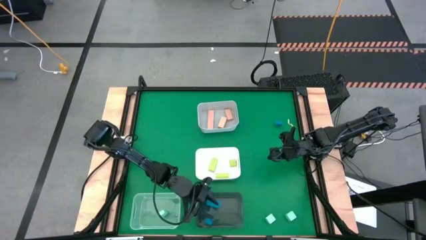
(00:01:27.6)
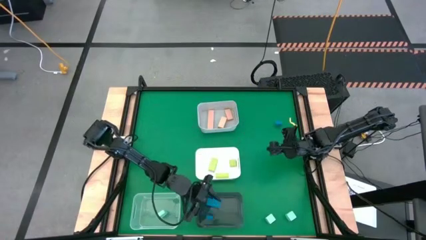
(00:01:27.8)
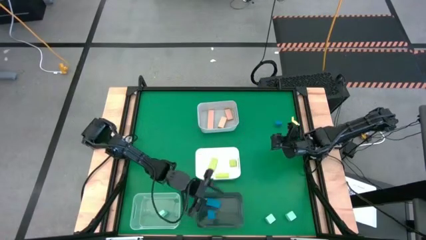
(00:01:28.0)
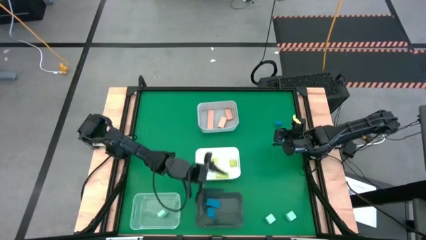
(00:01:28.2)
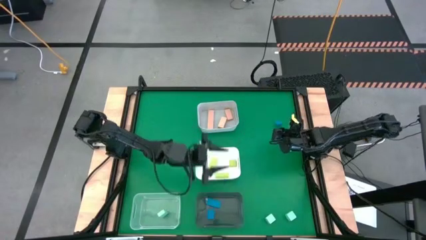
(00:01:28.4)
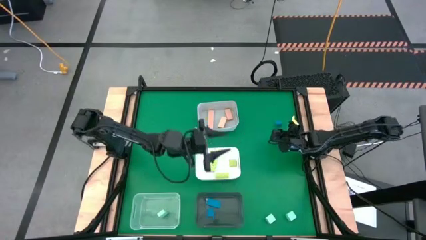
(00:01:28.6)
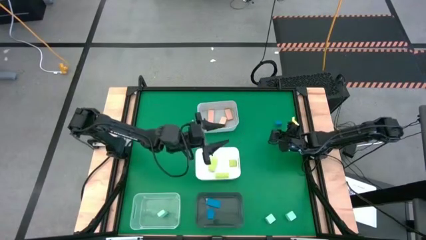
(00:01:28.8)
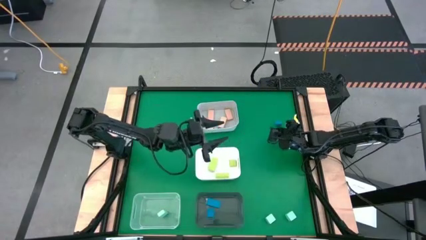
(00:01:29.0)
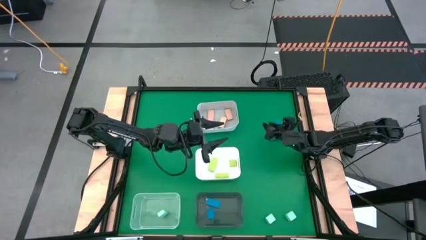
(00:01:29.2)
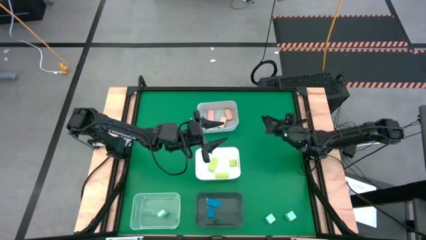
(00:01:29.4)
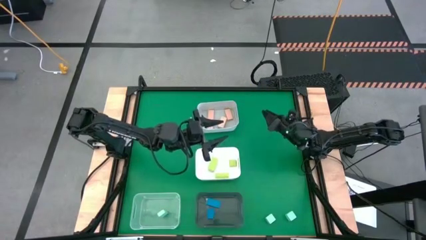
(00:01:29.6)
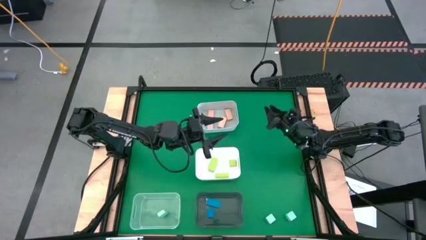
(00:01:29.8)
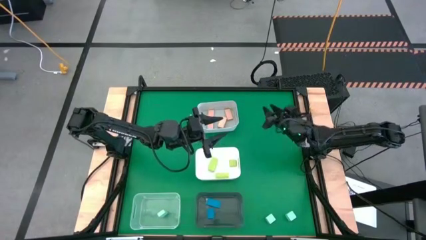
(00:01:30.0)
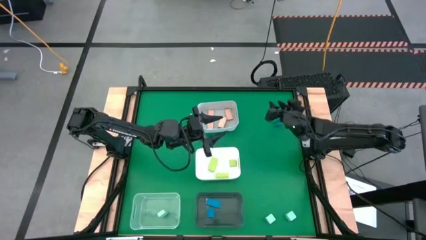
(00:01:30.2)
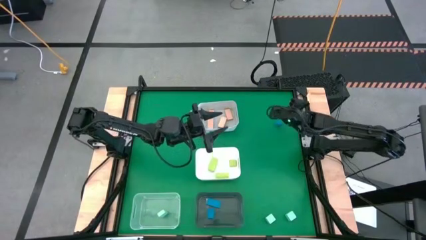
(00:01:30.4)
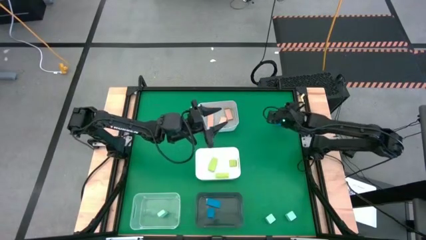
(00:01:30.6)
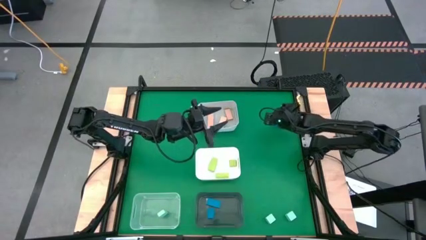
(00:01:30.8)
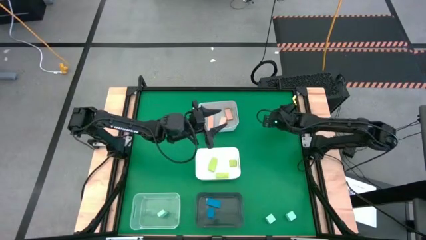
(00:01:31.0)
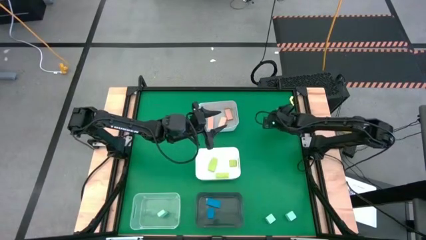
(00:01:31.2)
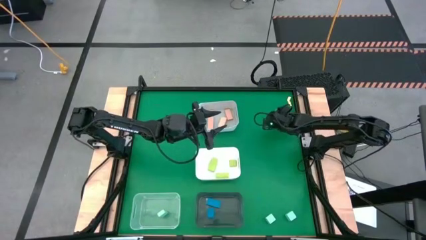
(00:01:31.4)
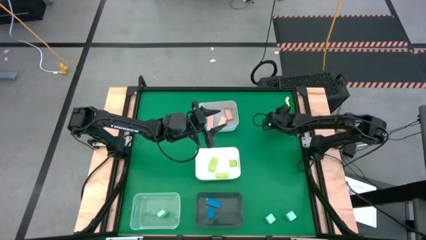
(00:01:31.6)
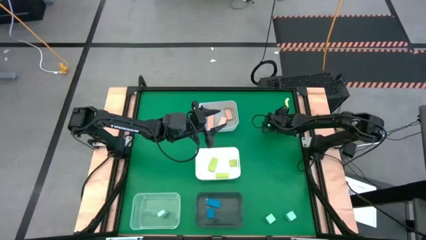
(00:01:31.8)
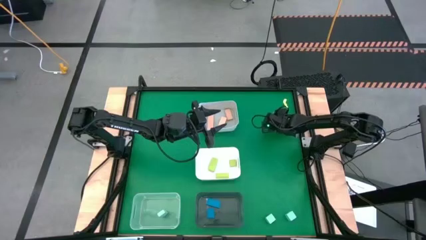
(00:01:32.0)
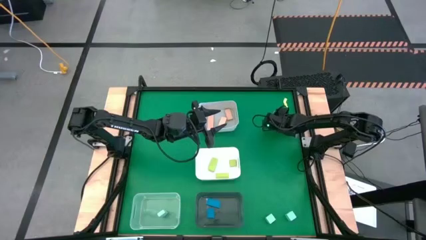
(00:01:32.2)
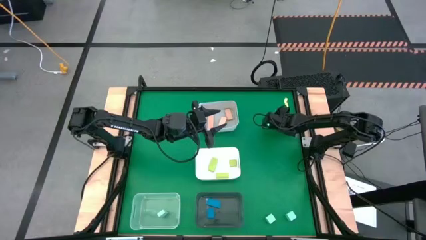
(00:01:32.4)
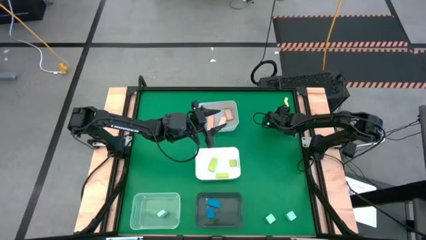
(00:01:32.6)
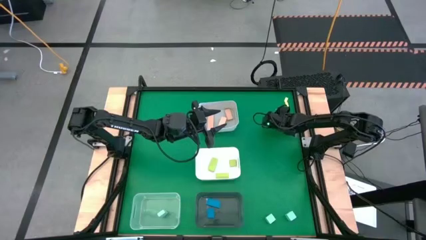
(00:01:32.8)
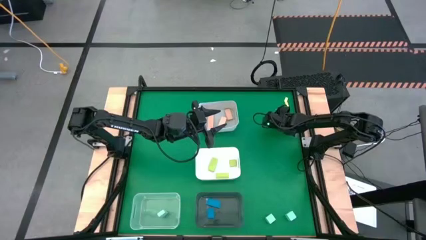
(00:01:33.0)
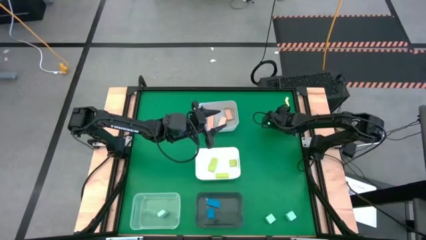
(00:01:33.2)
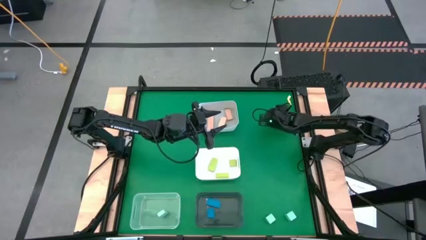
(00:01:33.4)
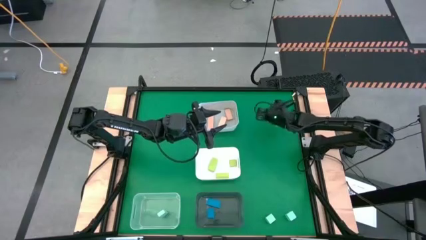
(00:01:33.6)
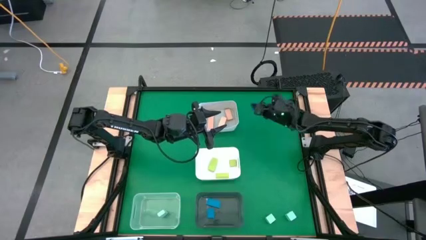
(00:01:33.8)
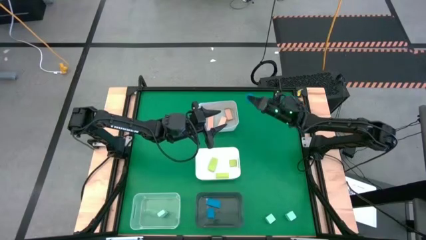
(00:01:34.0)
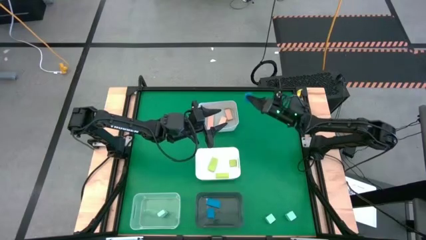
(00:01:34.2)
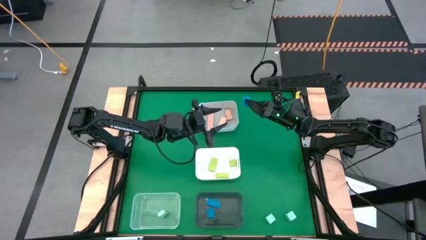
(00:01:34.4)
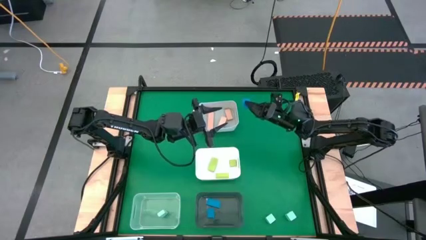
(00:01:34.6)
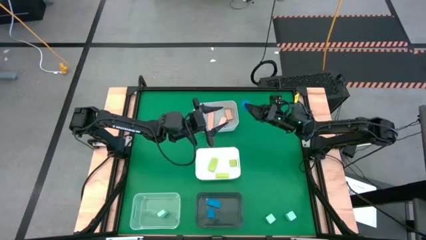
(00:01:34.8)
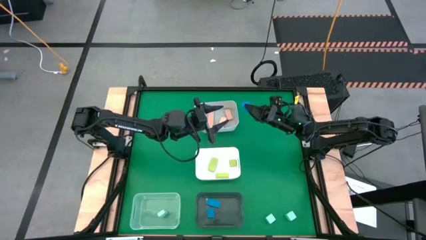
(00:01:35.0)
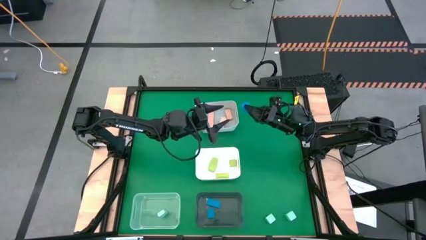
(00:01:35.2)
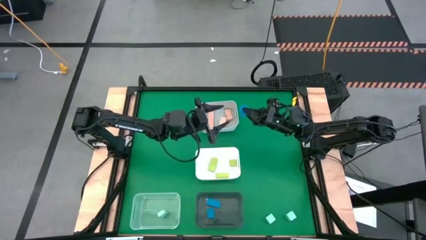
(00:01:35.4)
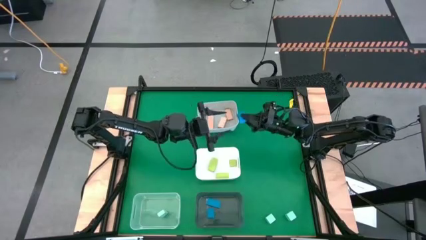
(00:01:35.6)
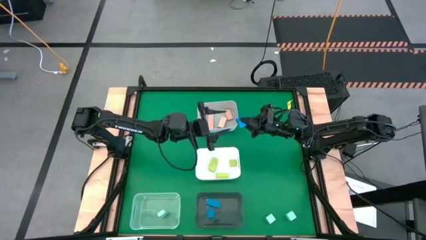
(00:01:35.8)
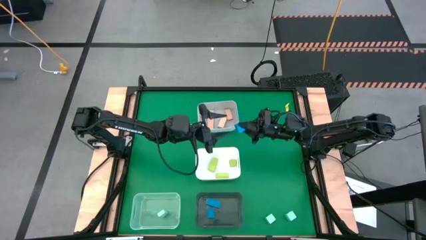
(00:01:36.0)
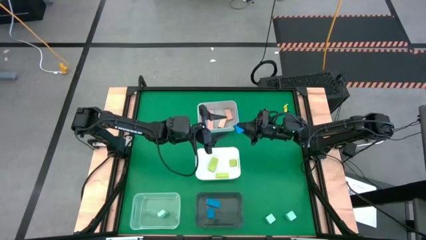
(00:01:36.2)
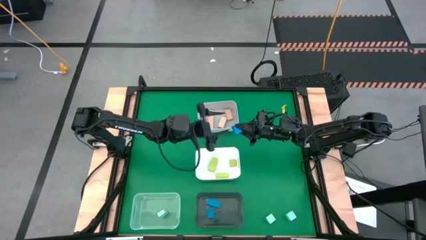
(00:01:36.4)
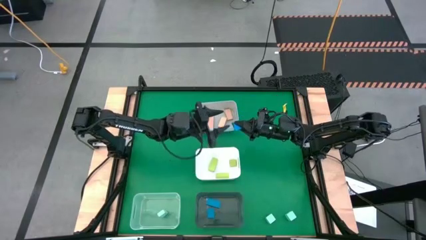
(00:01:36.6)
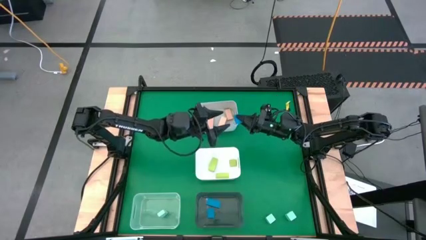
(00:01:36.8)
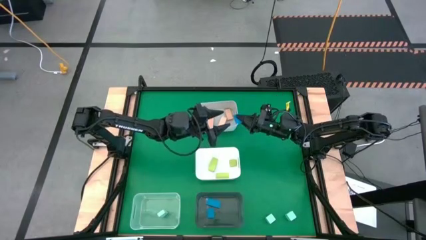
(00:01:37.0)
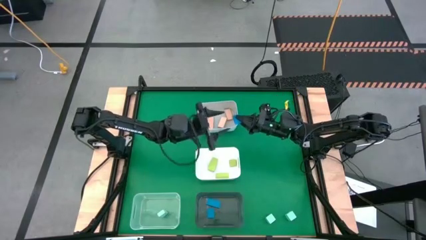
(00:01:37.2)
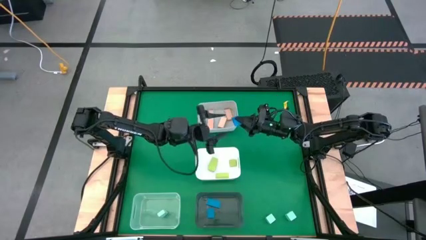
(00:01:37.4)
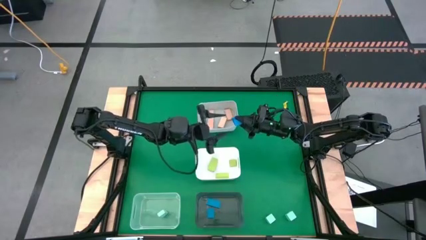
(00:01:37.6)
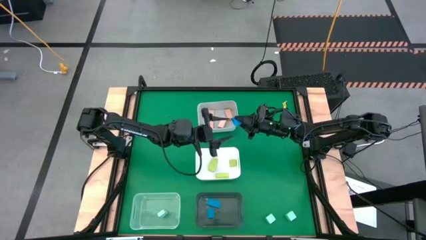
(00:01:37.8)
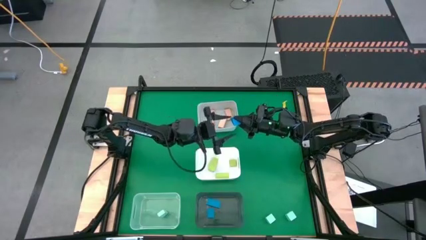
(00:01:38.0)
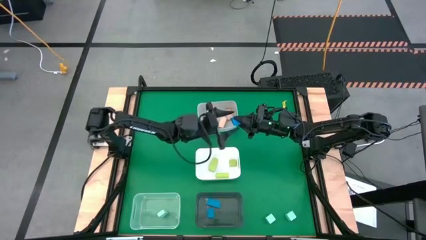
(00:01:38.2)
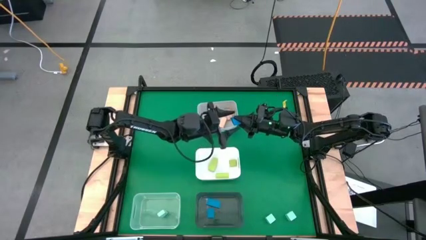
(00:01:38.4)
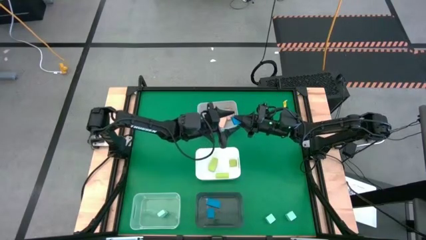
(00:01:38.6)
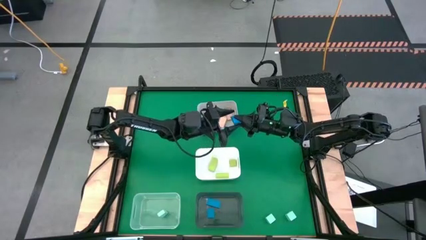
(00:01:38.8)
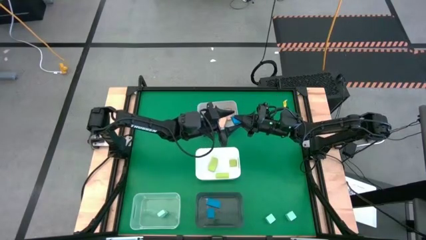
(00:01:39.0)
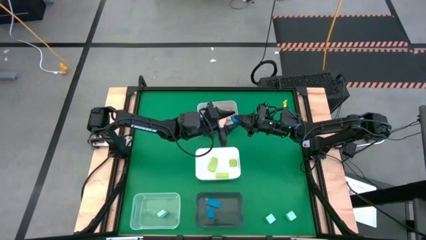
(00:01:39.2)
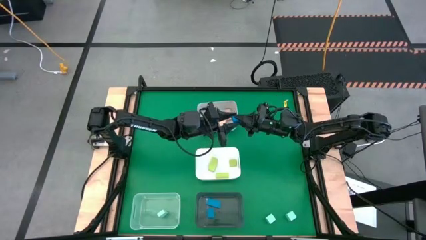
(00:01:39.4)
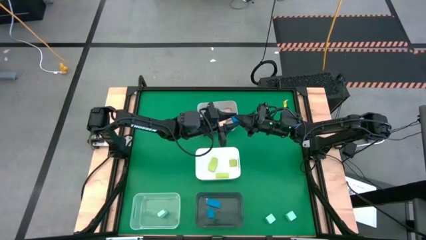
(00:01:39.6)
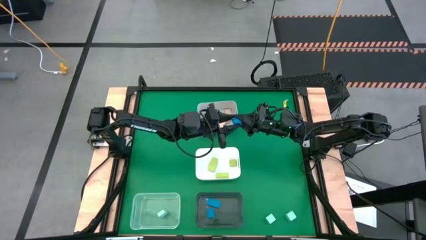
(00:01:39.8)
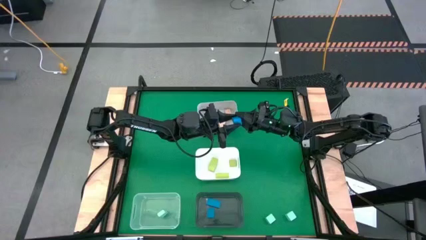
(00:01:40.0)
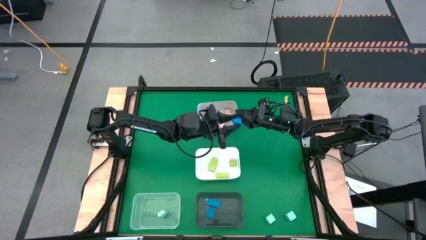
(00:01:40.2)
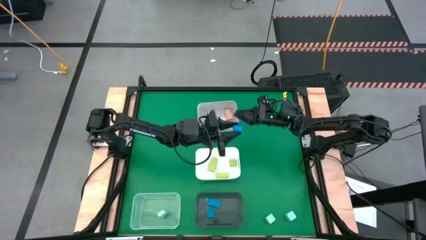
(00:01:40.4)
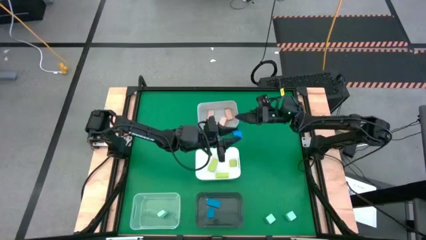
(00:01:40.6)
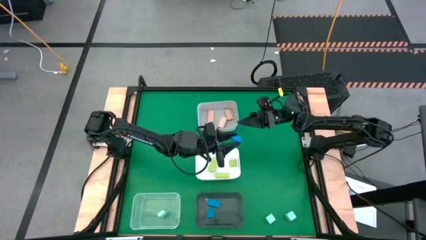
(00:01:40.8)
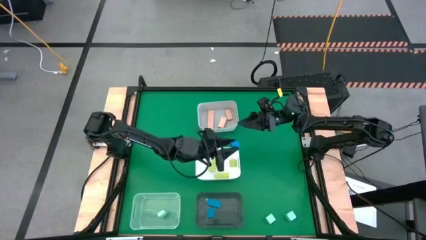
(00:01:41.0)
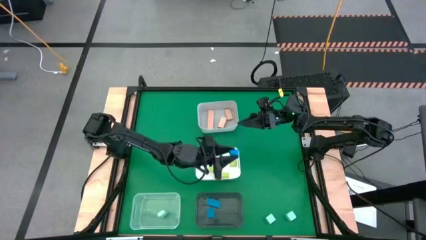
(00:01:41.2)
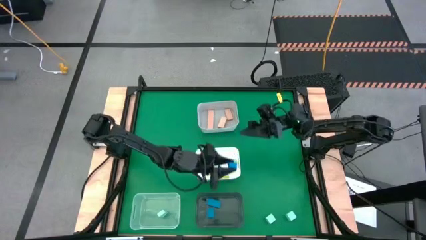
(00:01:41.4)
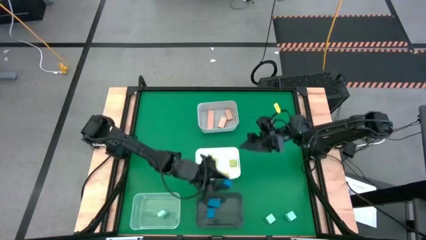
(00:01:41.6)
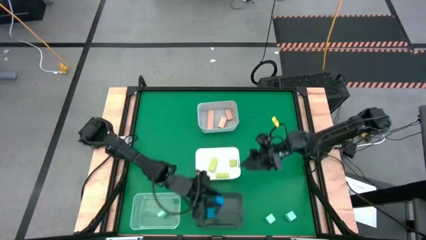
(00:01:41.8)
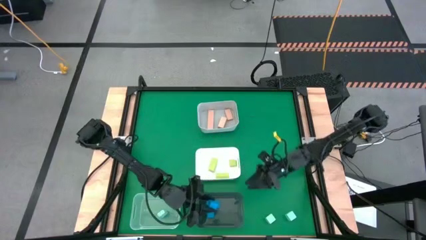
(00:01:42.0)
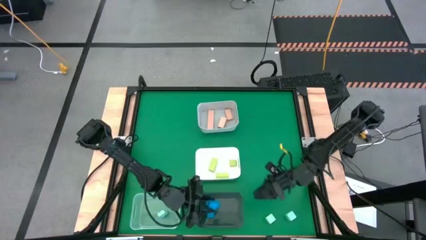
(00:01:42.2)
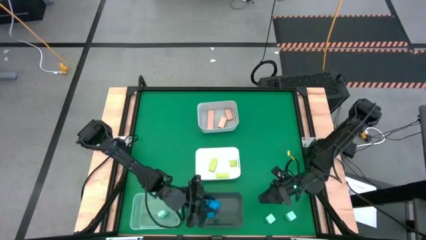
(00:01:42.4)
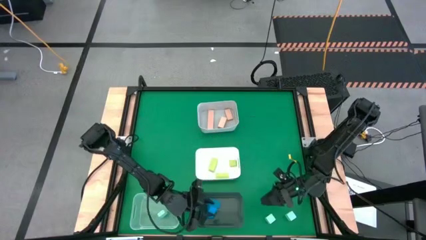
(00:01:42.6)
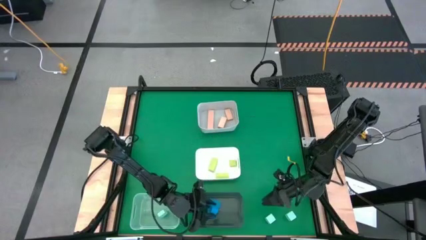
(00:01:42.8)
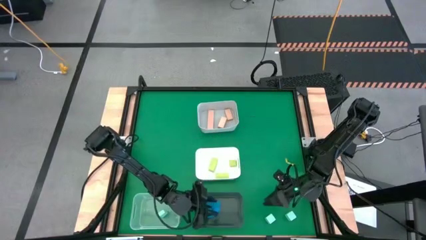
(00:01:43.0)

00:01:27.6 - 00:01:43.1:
Task: Sort & place blocks by color
Put the blue block into the black bin
